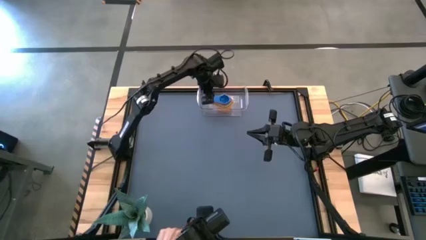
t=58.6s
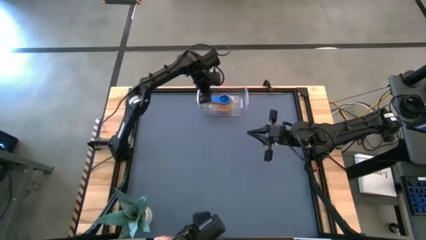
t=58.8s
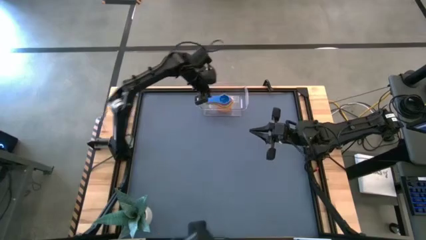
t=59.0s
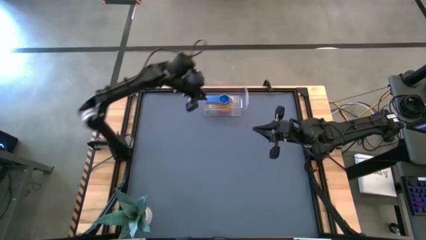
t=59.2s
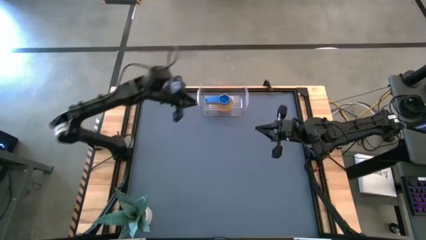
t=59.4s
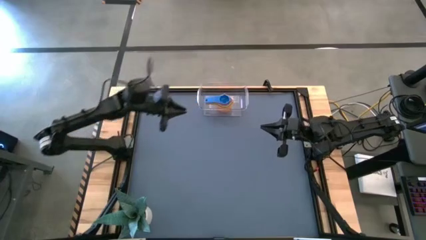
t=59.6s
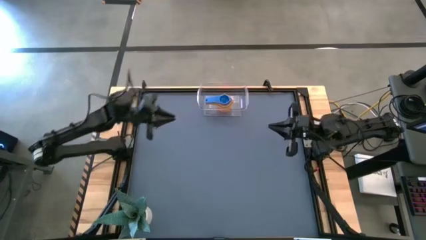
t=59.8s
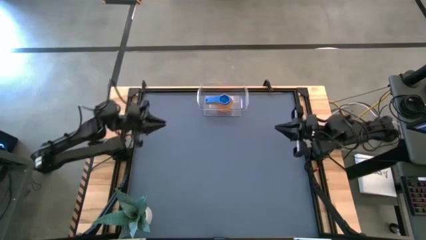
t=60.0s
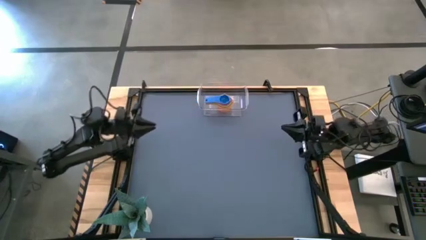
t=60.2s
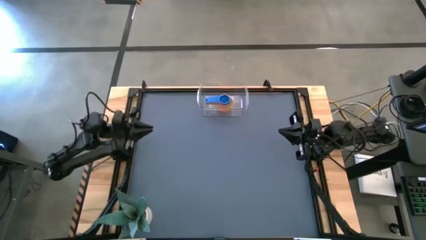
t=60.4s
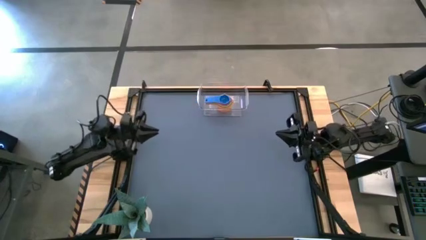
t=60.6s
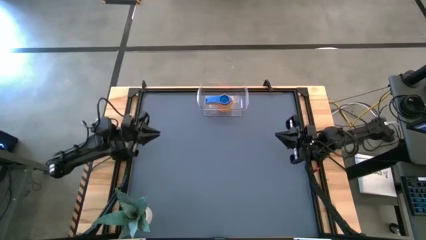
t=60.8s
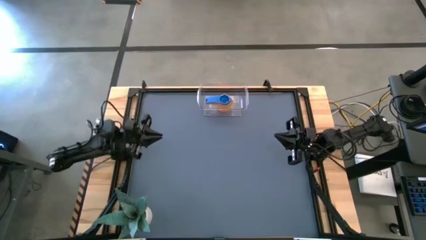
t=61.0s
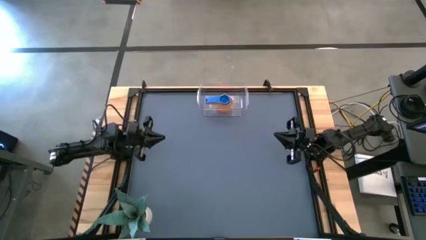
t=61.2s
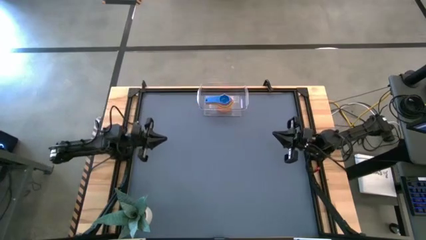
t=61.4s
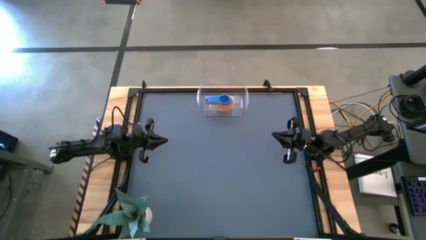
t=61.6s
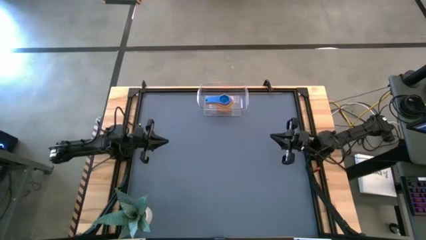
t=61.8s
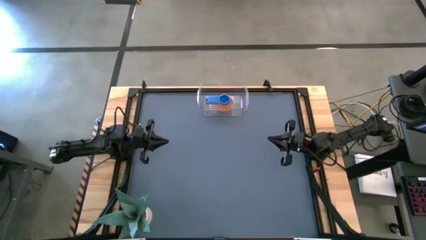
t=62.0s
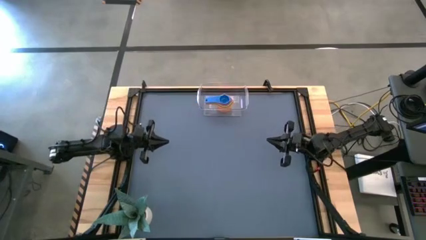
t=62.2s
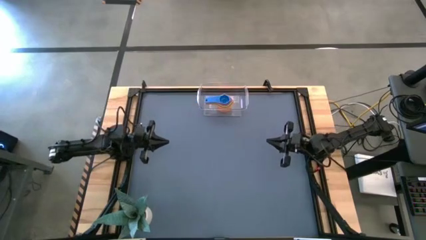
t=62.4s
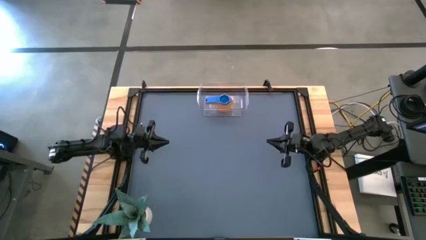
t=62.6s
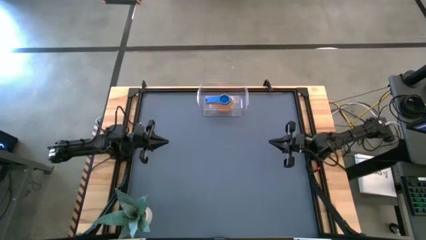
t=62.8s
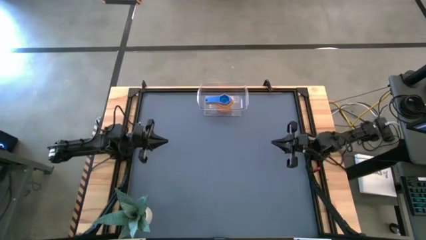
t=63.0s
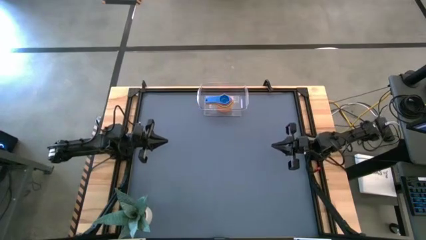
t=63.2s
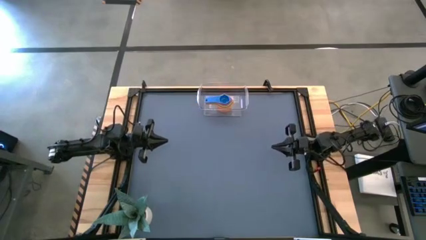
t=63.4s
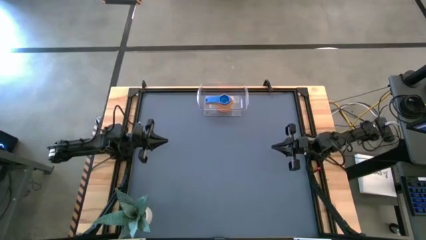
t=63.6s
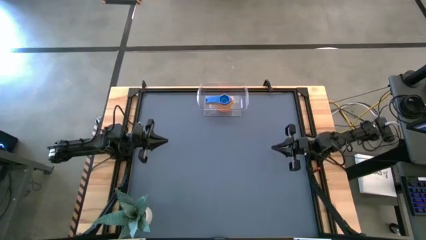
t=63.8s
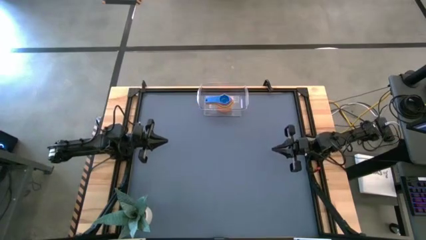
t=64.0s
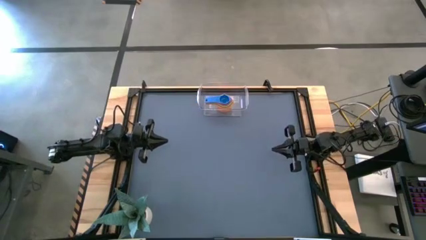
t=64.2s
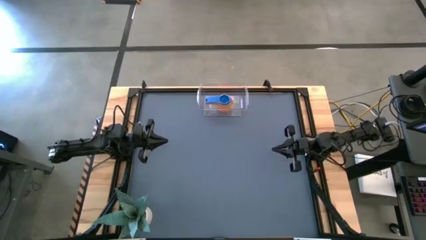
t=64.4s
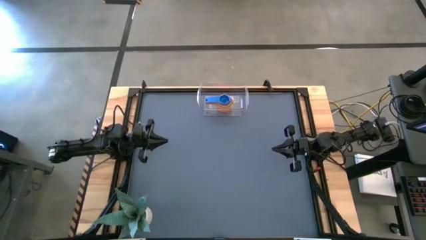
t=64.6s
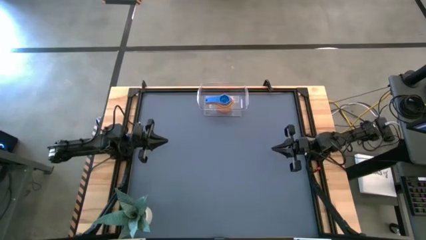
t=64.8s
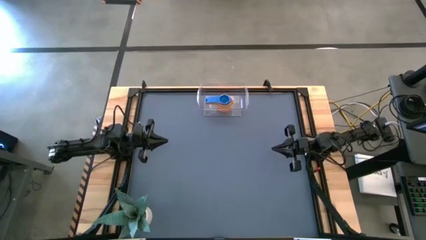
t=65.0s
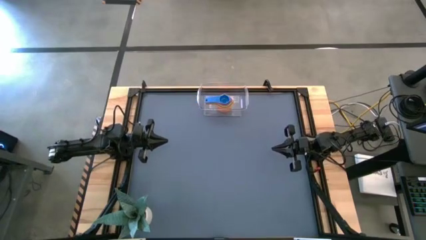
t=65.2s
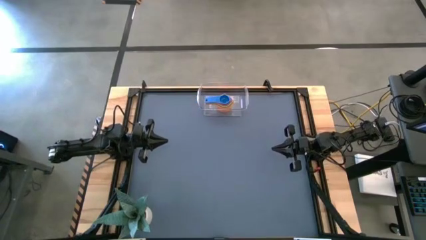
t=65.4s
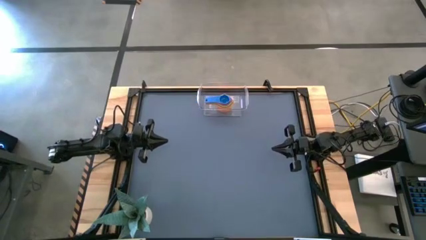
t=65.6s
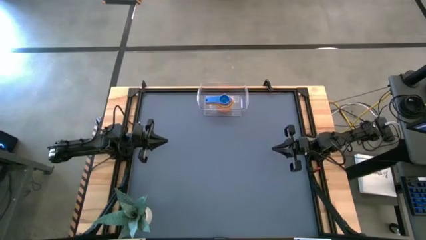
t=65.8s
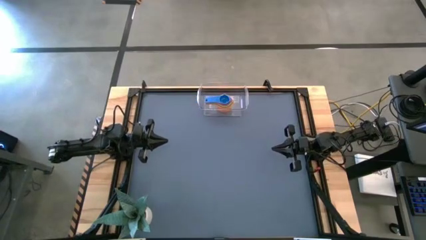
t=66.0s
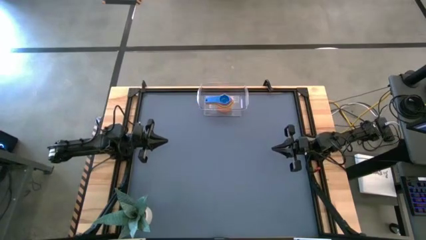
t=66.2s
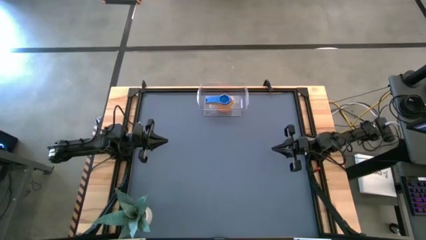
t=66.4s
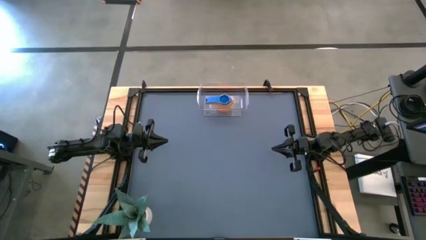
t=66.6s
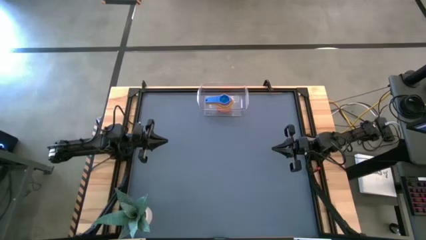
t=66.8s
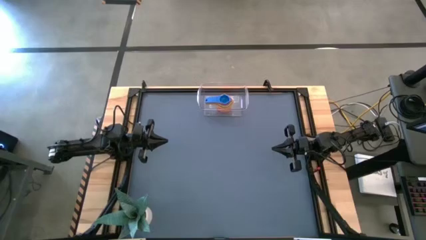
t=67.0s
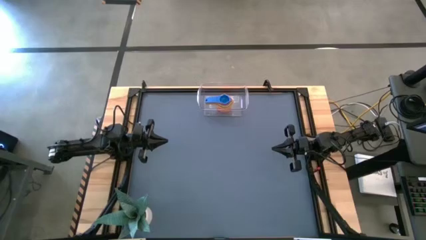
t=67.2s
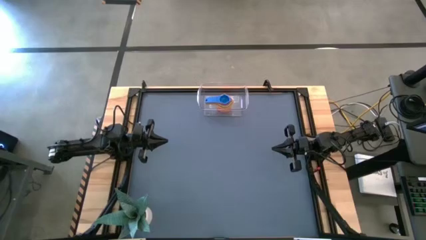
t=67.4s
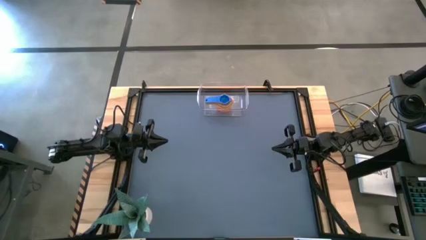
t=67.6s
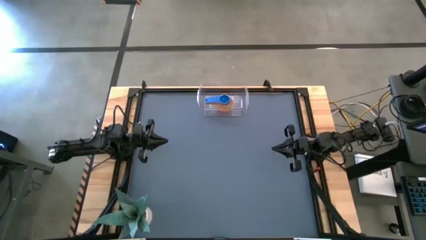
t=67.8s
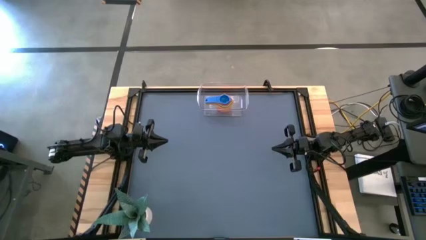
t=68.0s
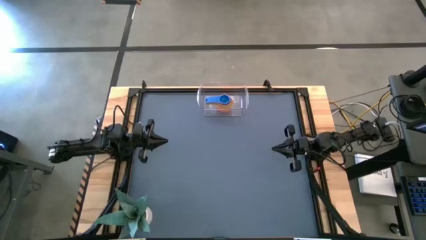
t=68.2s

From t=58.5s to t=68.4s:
Task: Nest measuring cups in basket
Return to Home Position

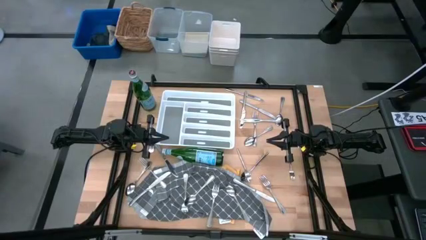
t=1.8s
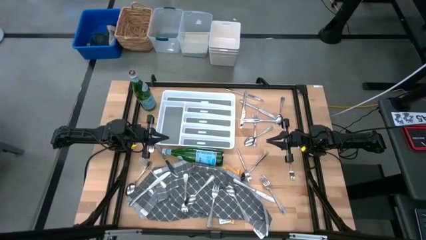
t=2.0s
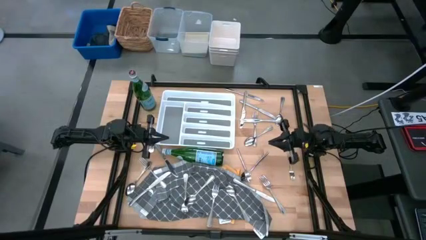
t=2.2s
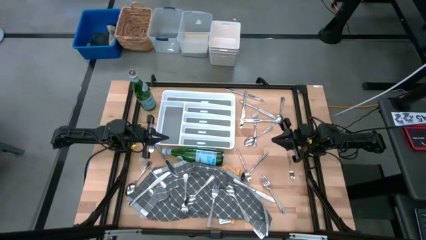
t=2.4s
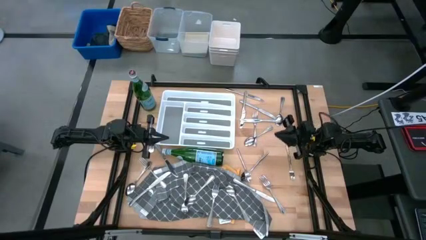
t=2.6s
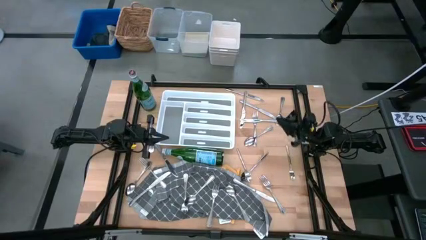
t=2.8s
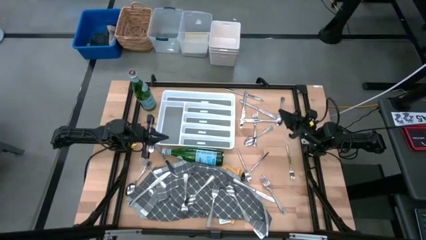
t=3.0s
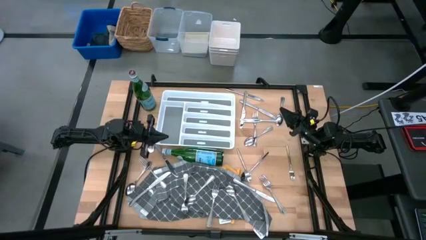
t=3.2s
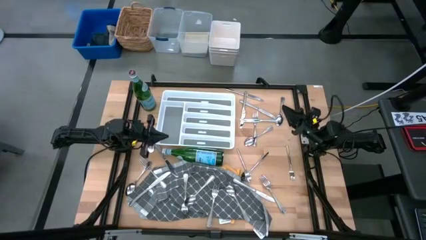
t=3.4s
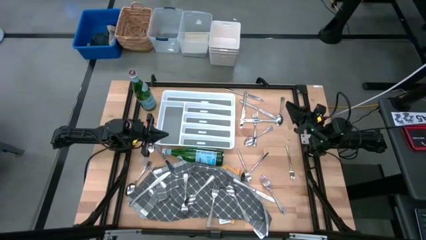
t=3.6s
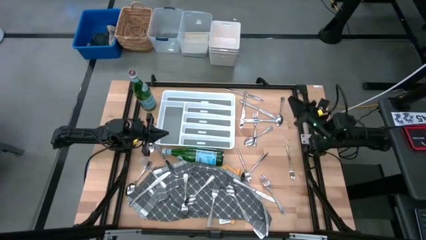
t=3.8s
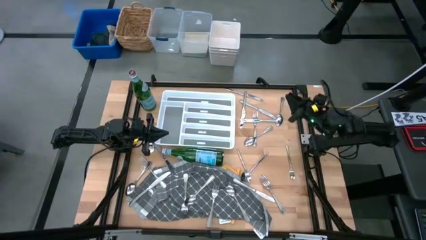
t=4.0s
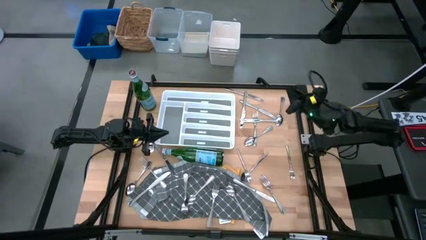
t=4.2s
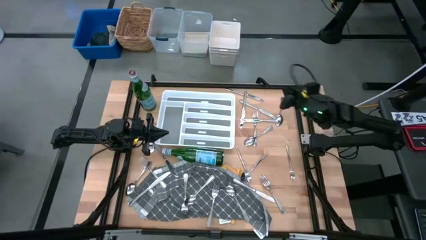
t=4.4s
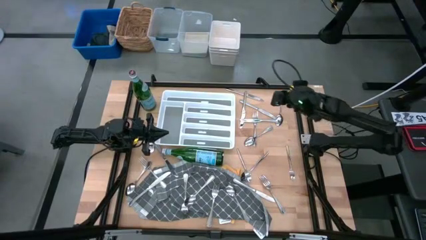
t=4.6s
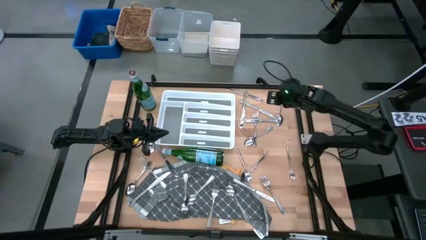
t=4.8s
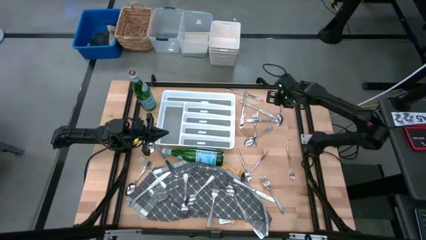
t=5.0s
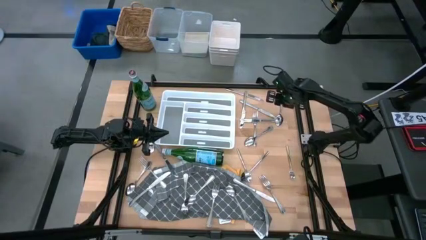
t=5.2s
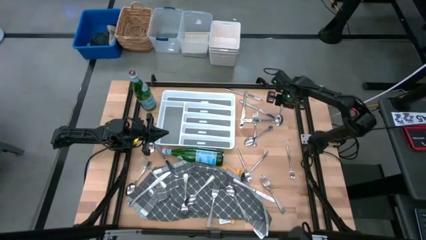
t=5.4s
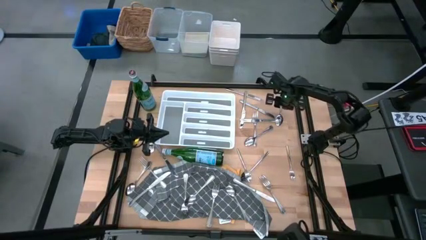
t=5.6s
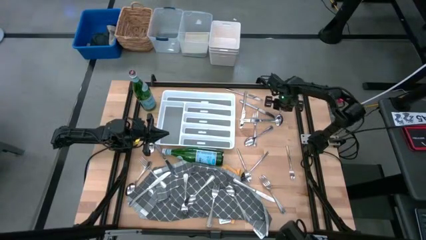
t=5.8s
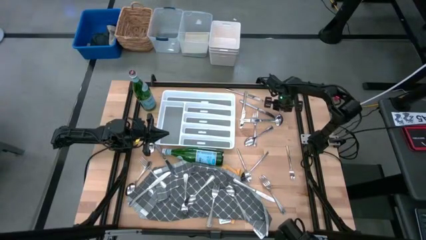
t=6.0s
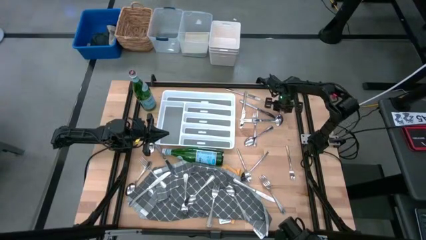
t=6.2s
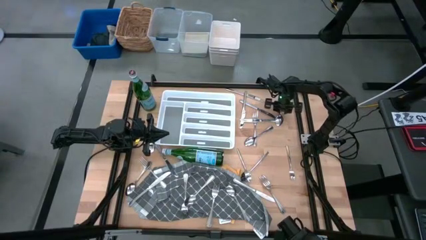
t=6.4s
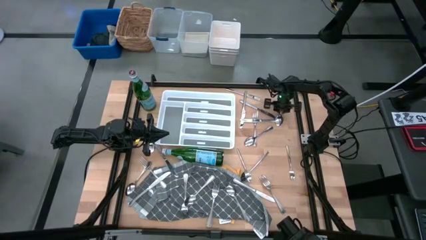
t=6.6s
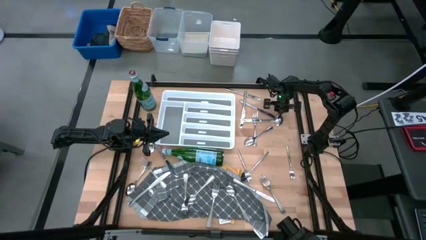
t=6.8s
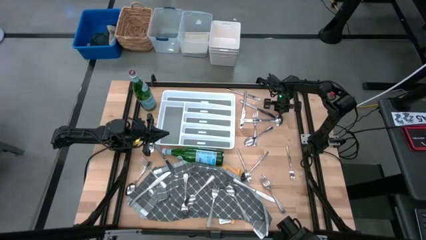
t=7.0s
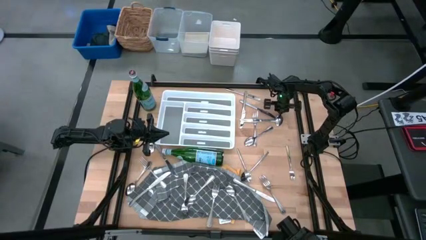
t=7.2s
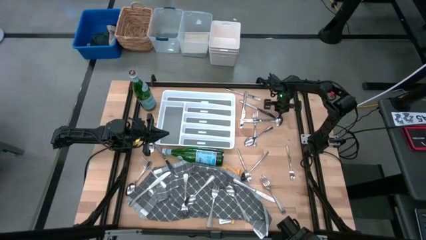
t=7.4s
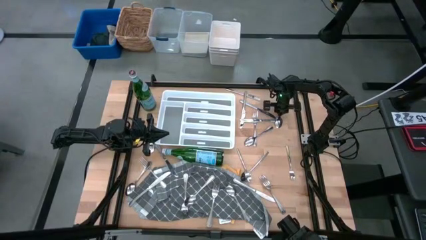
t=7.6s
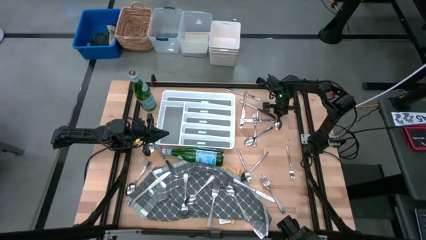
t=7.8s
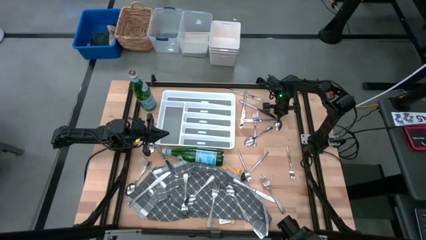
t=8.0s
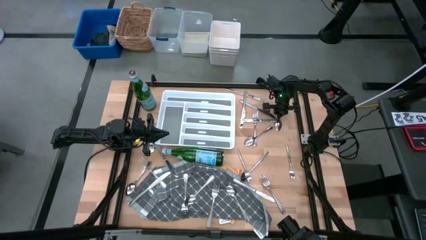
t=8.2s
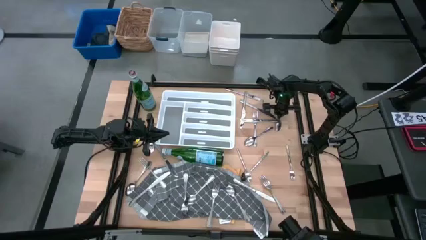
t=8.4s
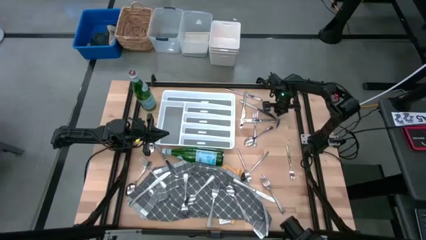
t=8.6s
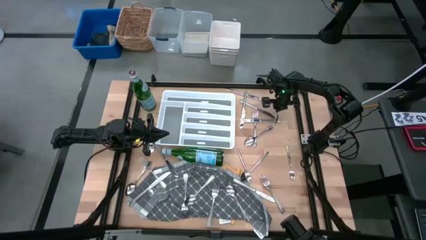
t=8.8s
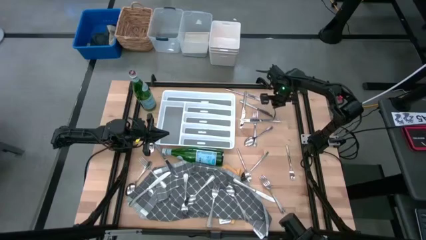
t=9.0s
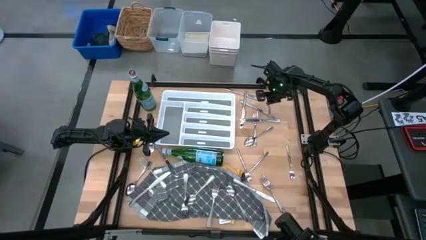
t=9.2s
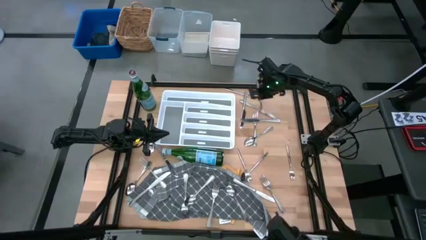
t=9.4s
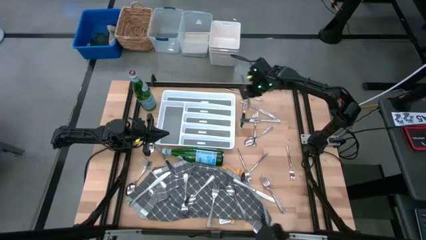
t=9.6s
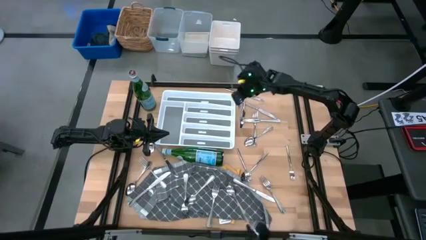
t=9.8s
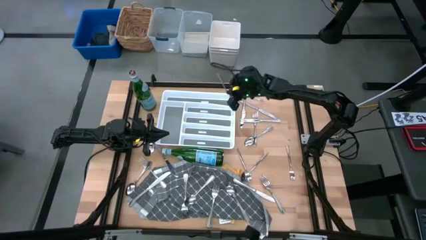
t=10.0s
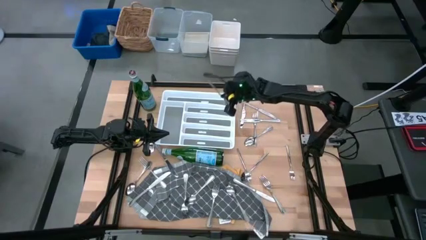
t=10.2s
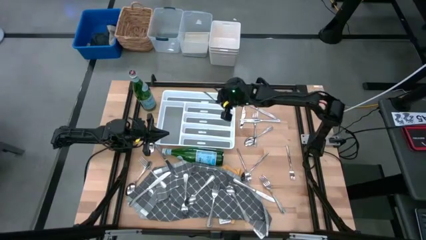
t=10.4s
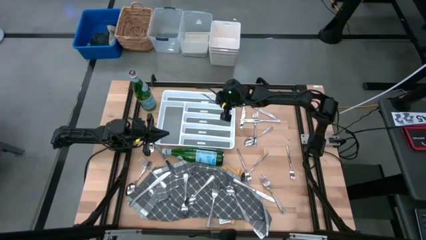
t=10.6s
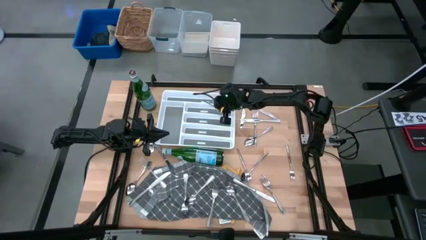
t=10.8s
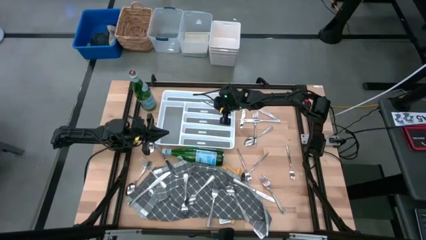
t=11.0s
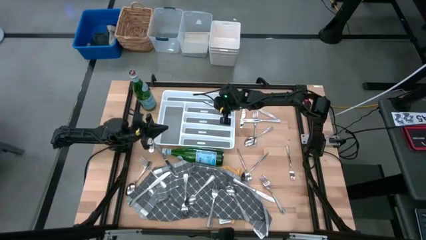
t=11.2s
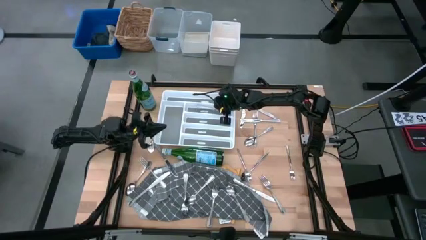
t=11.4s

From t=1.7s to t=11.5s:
Task: Sort silverware
Put the silver spoon into the silverware tray
